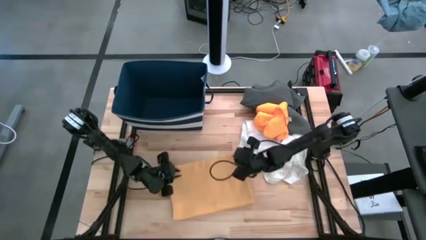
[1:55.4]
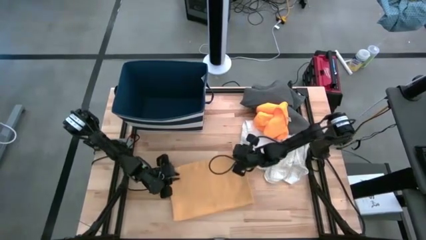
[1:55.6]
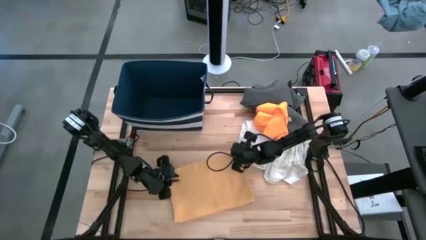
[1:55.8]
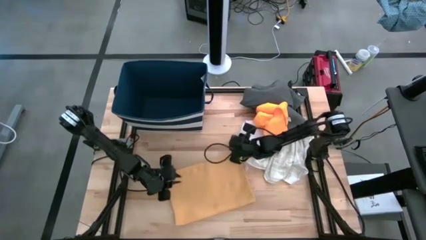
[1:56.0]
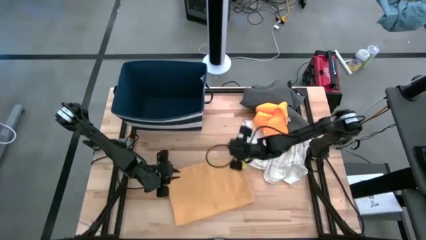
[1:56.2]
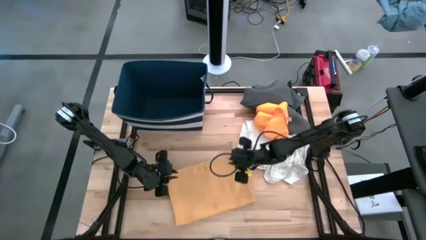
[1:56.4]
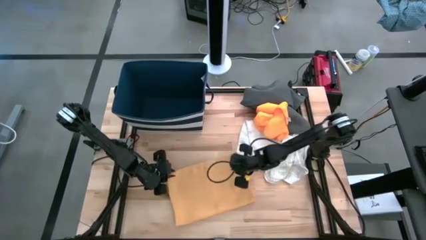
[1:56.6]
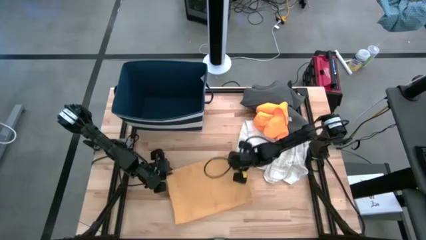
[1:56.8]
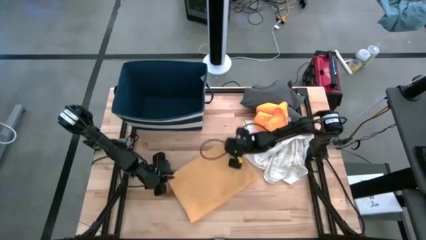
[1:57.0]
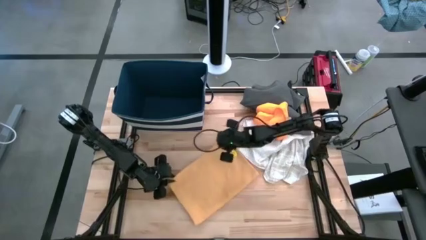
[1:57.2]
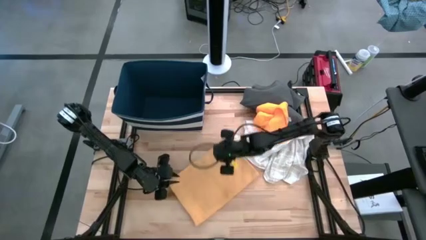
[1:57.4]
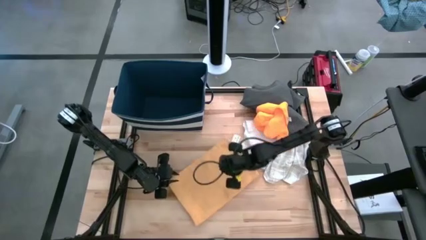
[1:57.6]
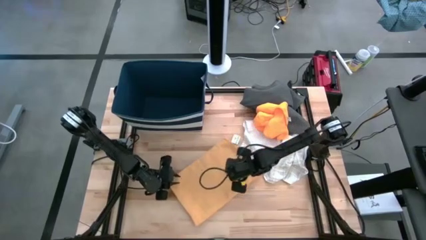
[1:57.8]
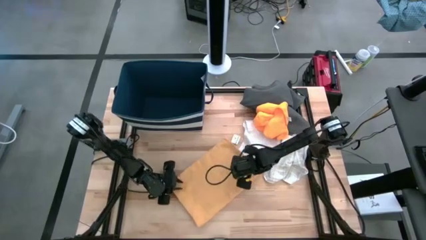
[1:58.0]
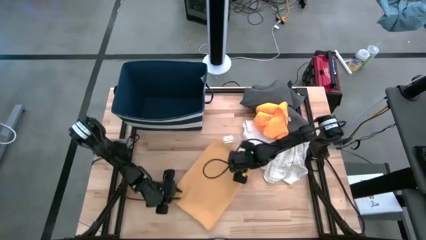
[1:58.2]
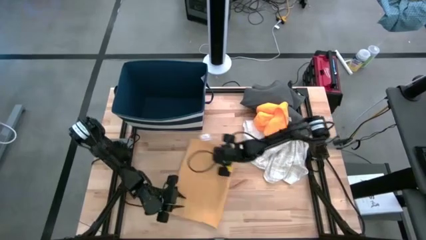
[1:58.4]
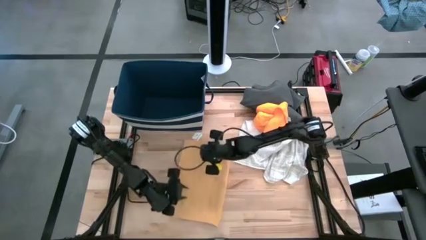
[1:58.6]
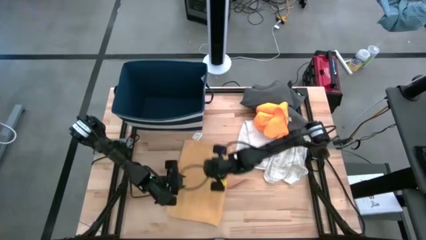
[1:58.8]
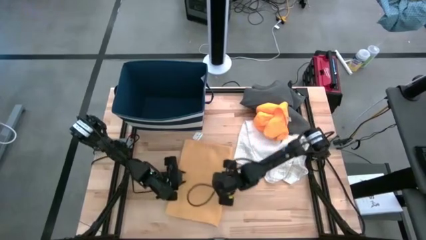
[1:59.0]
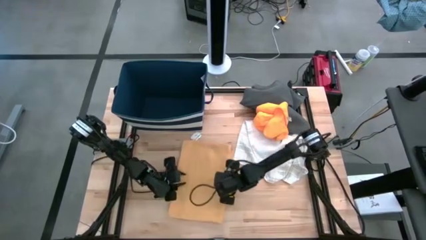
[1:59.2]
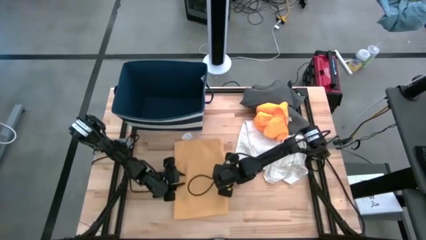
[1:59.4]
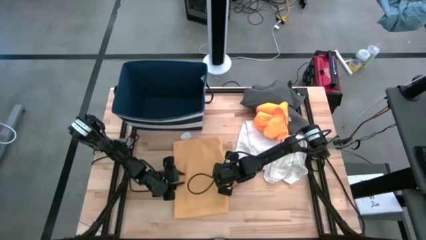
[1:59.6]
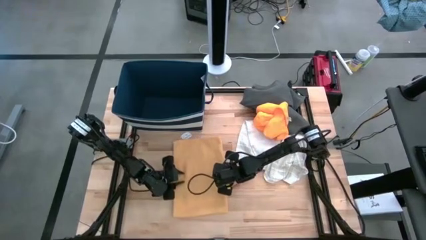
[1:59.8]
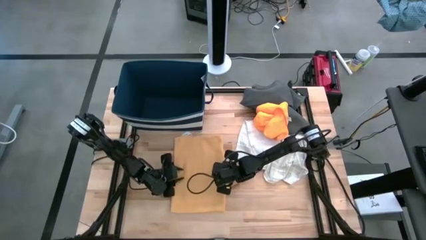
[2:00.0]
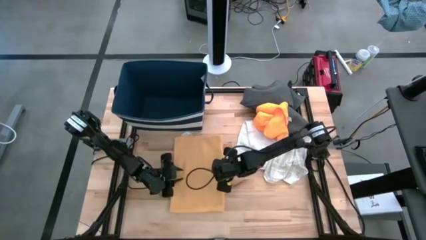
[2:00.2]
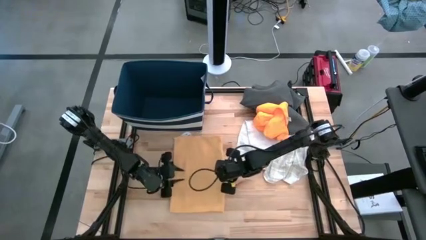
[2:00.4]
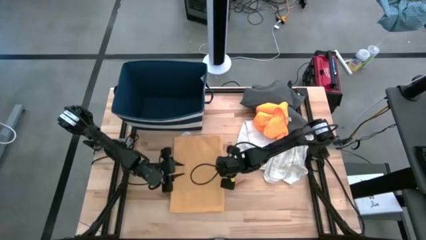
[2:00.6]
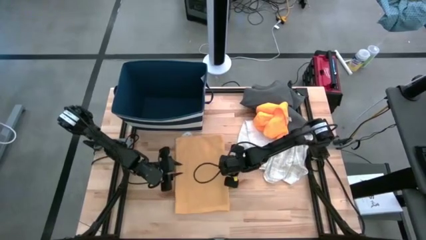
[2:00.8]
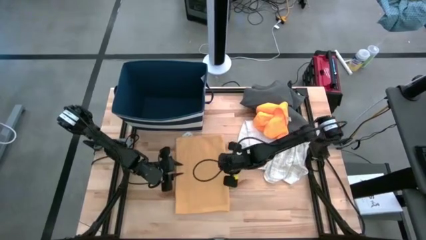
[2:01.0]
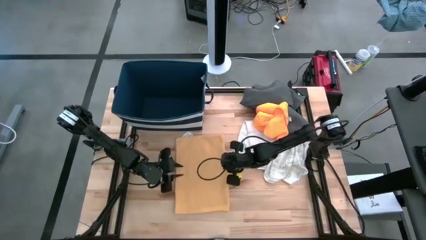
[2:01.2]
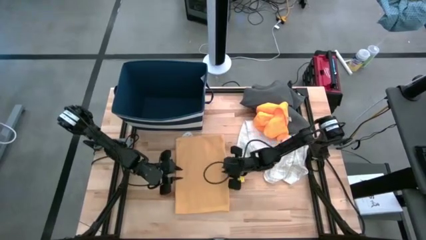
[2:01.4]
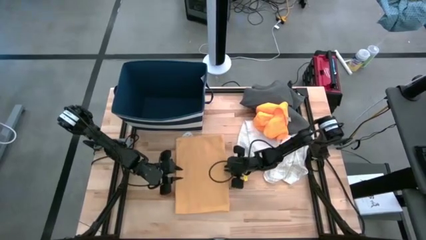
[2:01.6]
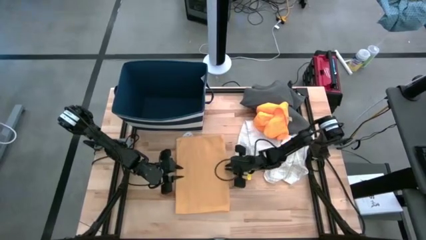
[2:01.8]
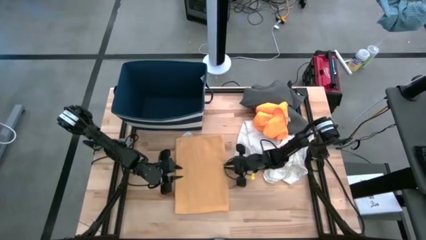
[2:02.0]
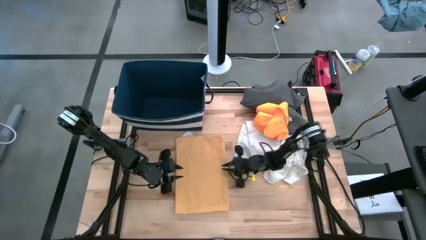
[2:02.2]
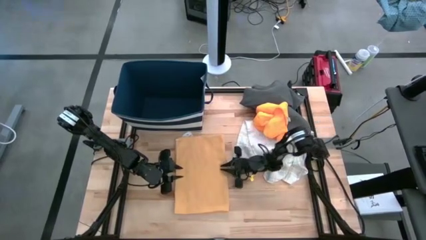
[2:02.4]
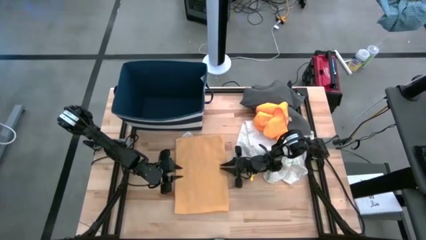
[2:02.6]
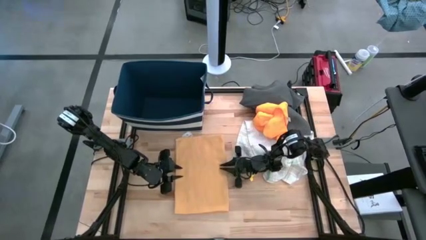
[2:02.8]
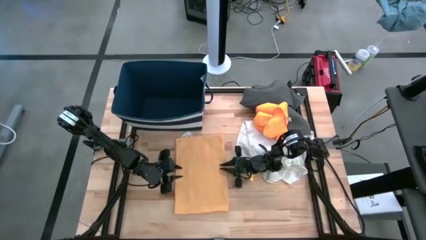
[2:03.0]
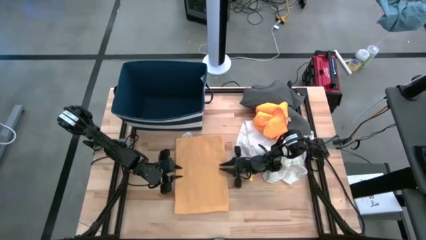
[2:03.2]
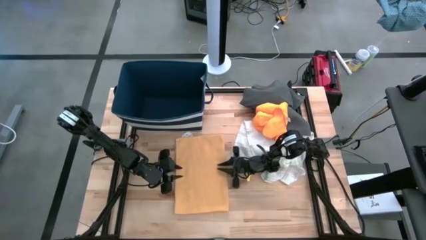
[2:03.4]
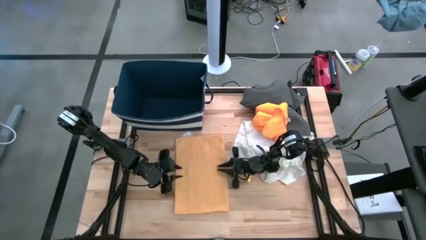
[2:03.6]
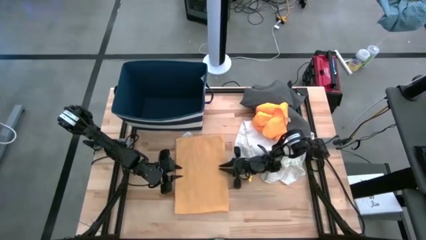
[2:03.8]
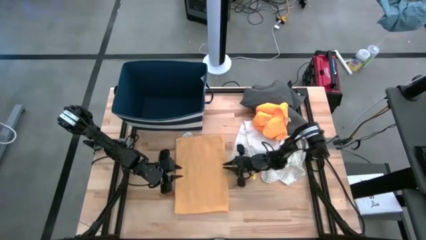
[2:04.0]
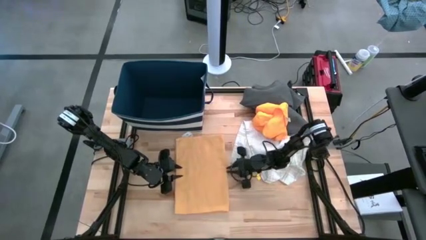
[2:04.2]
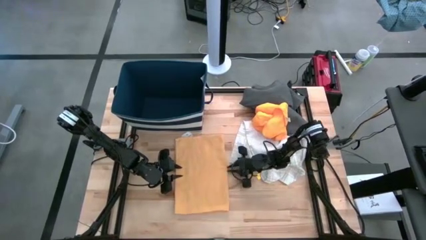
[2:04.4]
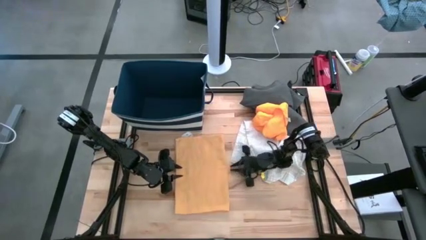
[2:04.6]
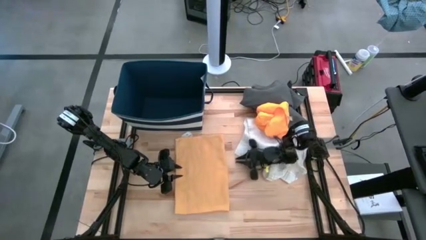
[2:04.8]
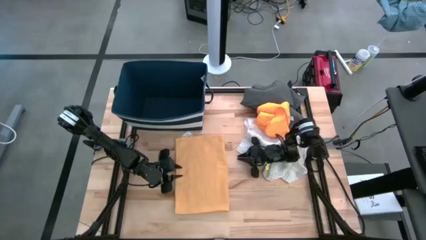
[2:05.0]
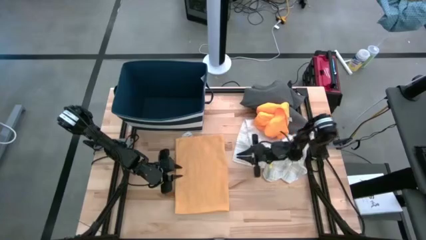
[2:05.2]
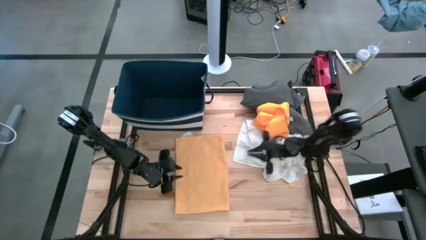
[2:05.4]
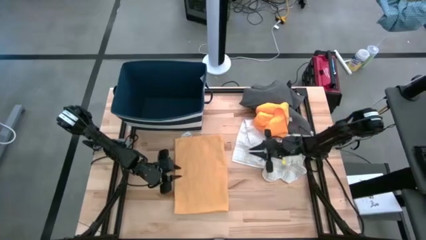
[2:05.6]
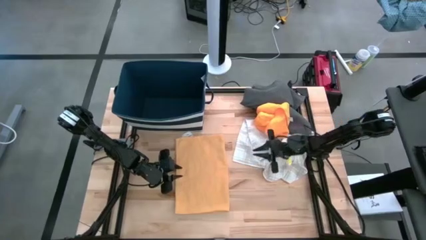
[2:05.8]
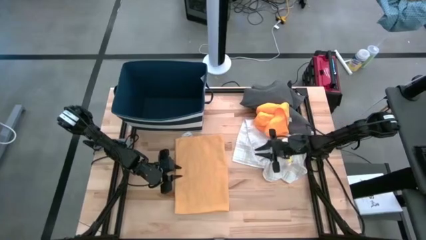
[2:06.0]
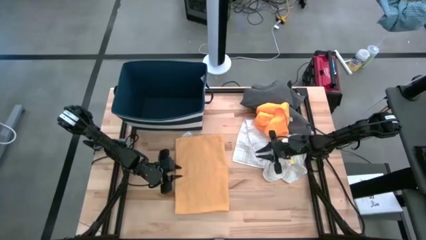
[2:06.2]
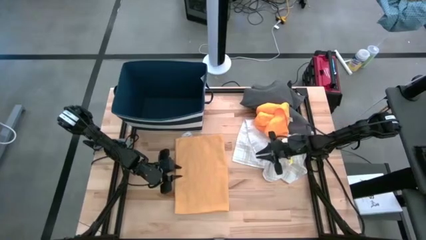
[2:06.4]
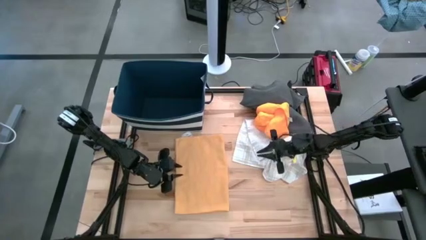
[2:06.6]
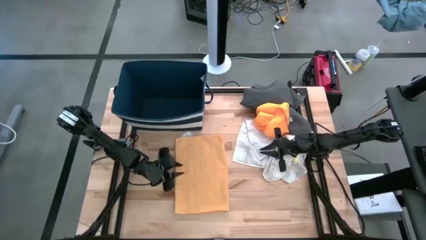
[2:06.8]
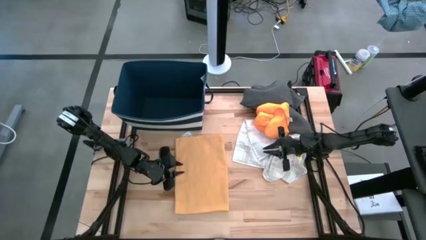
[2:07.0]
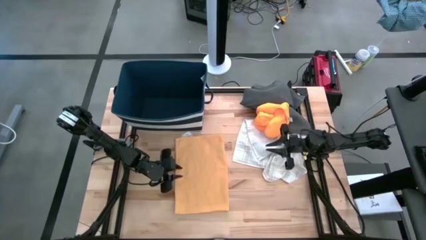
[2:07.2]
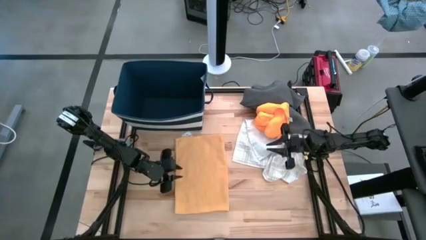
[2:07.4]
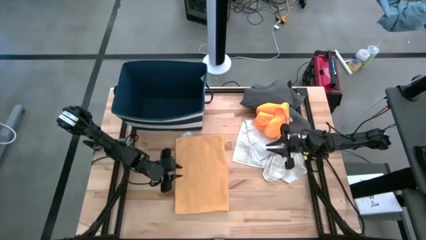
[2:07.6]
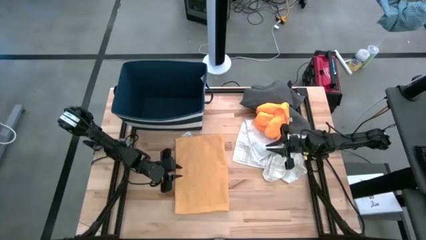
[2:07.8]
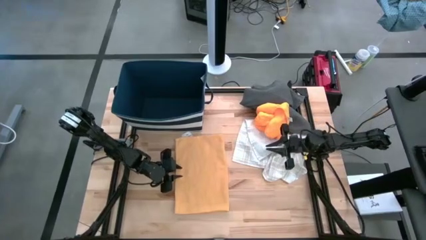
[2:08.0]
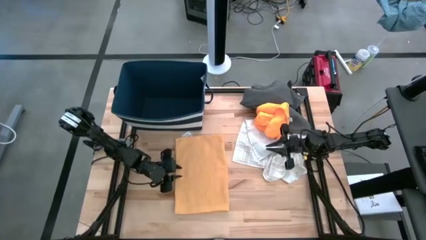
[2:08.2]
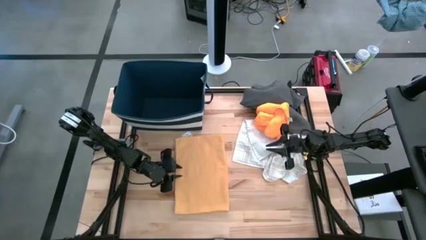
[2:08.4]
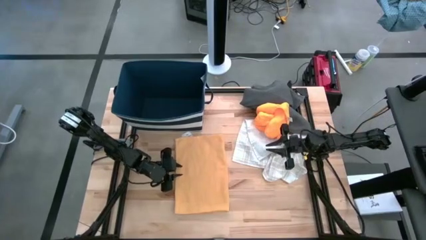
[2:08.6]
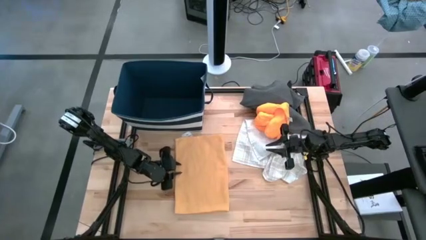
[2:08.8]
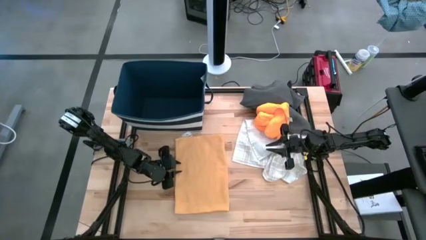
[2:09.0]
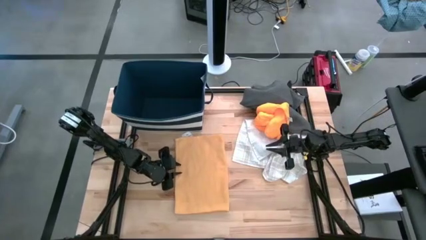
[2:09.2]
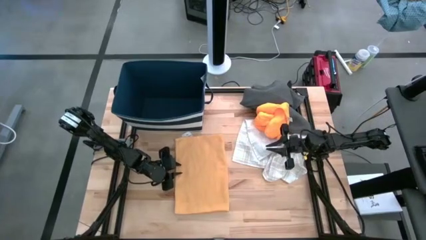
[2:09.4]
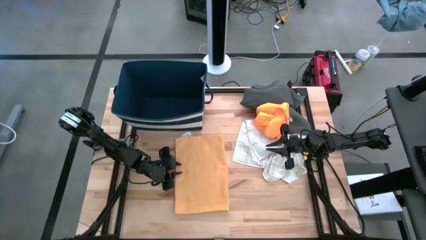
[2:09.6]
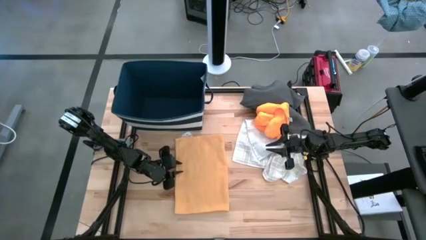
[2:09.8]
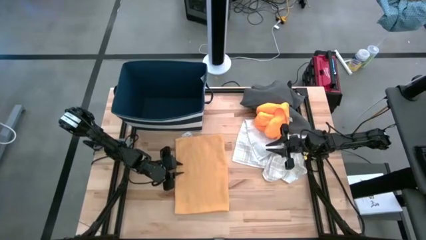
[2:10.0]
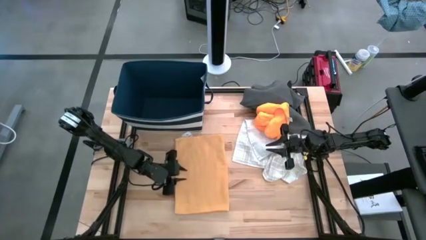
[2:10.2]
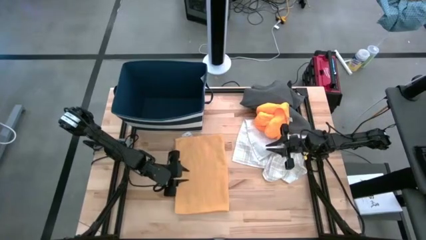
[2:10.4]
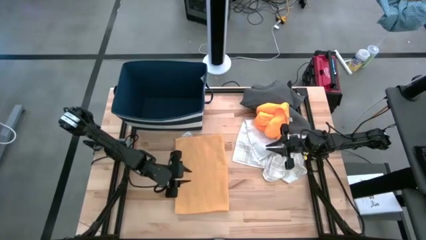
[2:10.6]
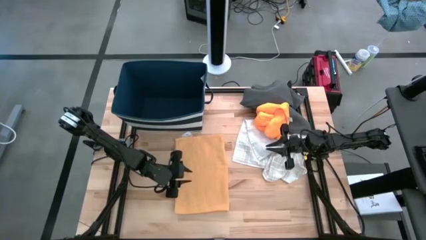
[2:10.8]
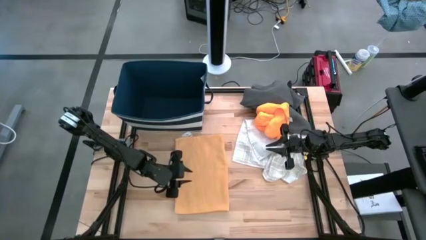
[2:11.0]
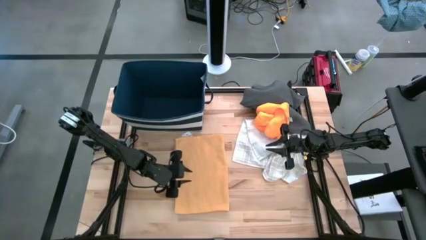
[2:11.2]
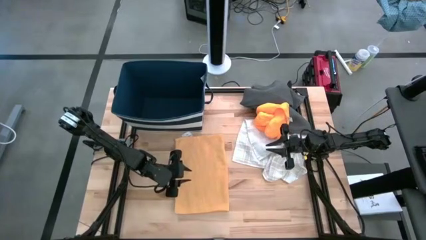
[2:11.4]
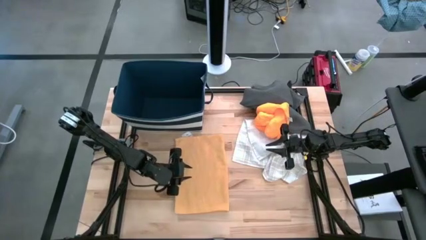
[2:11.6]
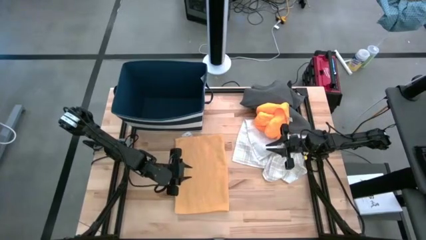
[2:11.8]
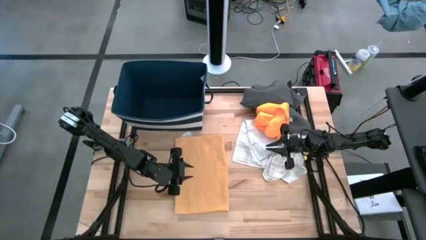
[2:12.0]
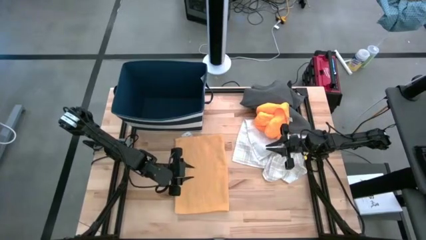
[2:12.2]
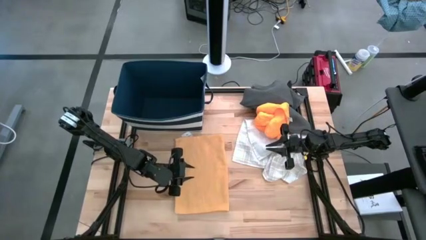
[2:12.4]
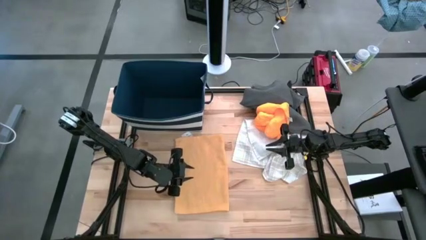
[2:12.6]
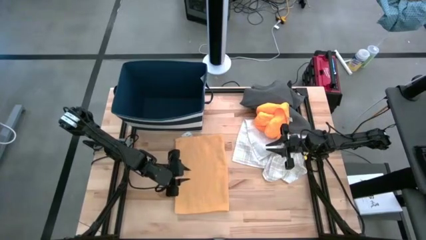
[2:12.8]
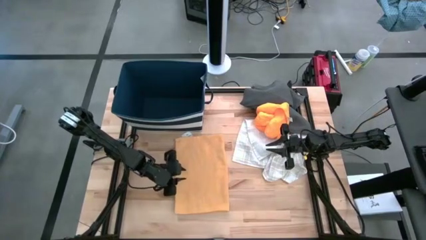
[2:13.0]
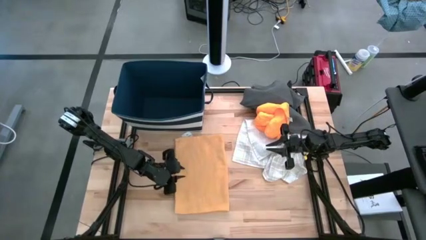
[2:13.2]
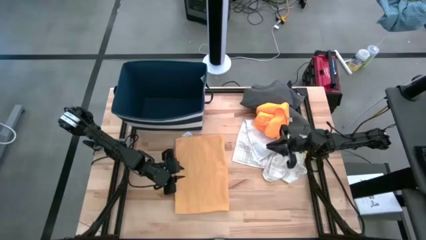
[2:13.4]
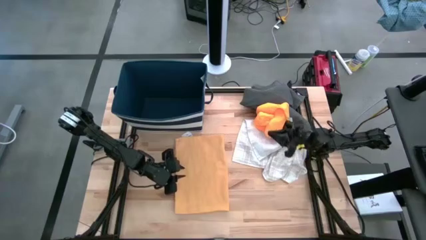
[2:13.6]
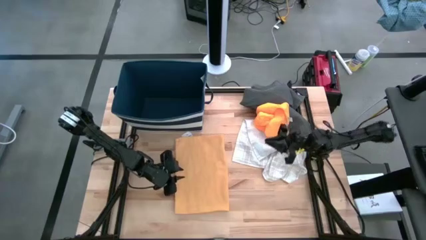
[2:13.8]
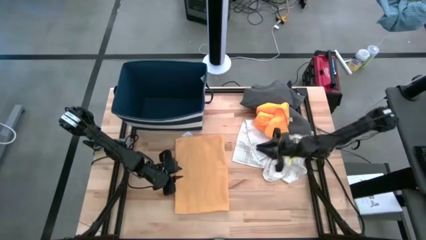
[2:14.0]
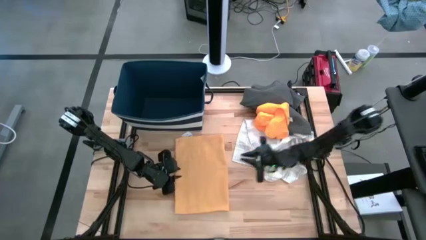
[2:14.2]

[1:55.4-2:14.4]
Task: Fold towel
Fold the yellow kitchen towel
